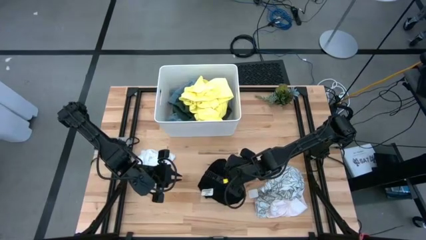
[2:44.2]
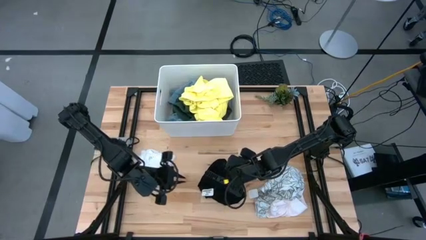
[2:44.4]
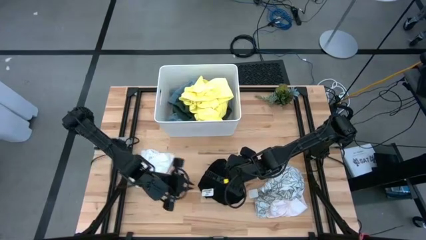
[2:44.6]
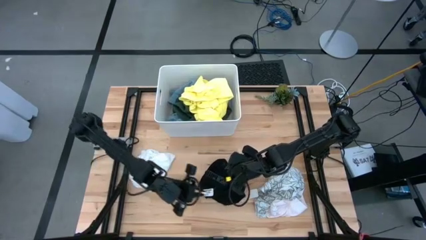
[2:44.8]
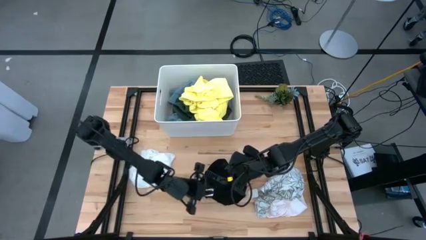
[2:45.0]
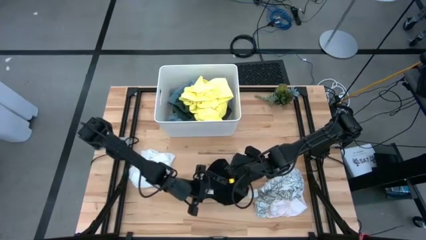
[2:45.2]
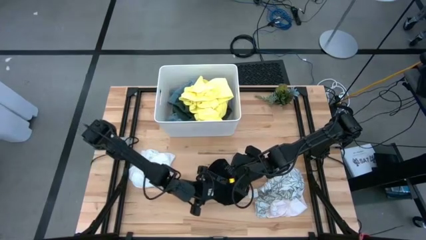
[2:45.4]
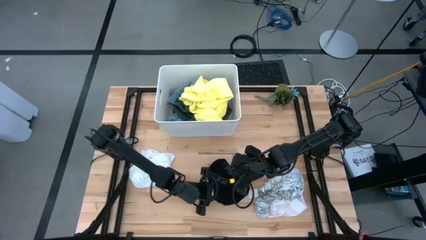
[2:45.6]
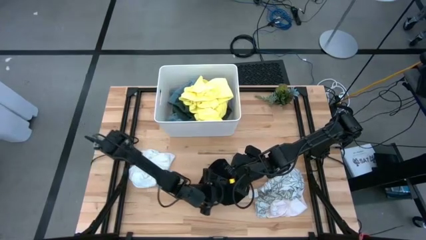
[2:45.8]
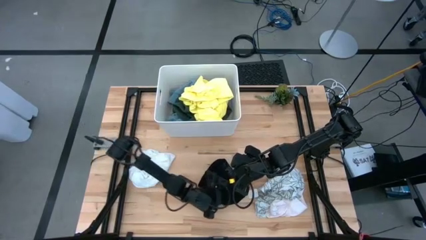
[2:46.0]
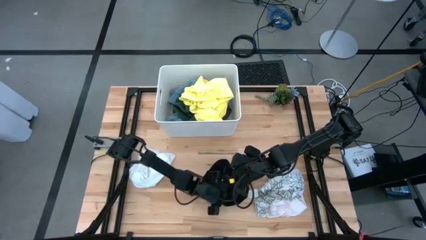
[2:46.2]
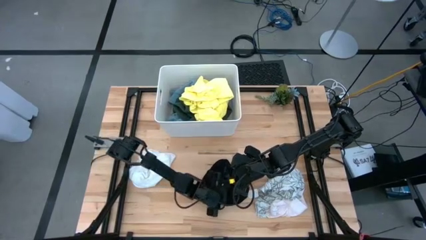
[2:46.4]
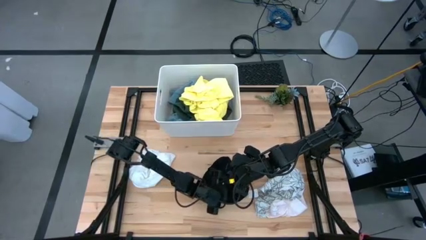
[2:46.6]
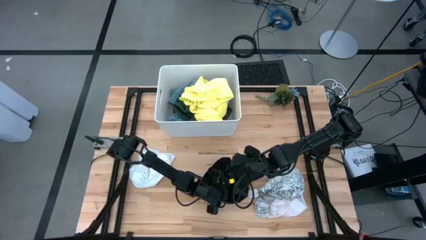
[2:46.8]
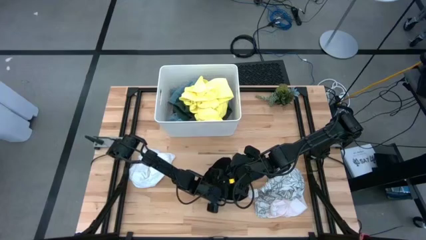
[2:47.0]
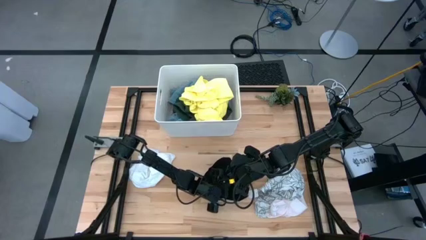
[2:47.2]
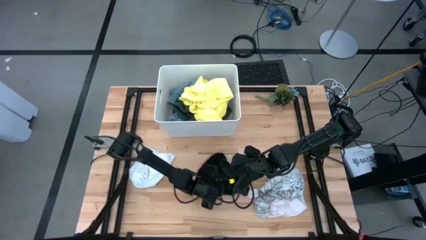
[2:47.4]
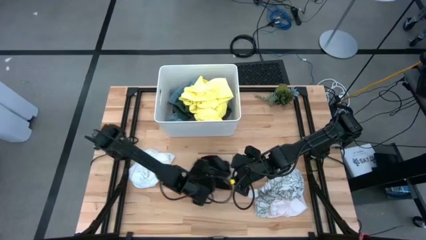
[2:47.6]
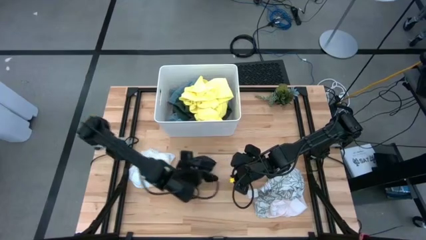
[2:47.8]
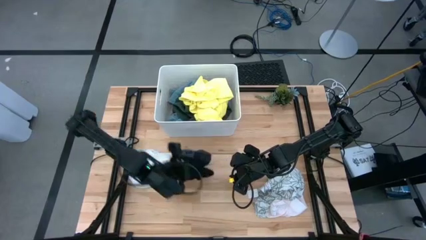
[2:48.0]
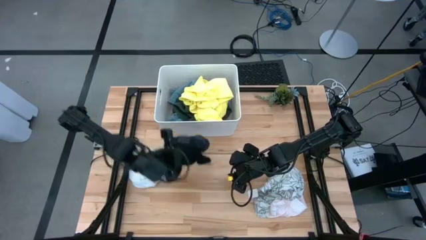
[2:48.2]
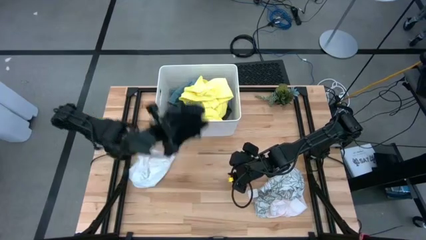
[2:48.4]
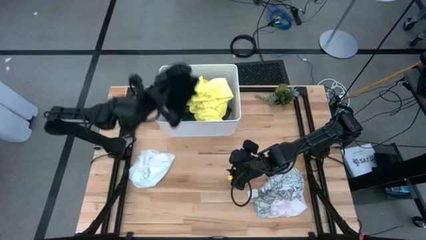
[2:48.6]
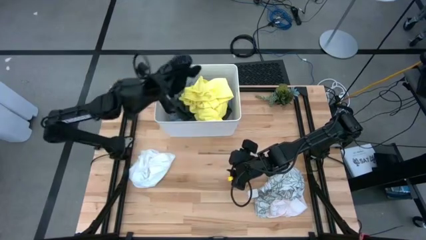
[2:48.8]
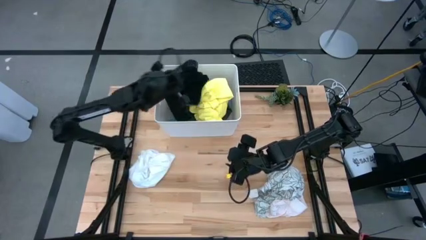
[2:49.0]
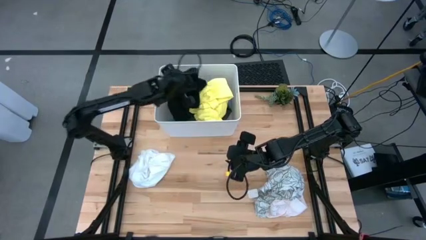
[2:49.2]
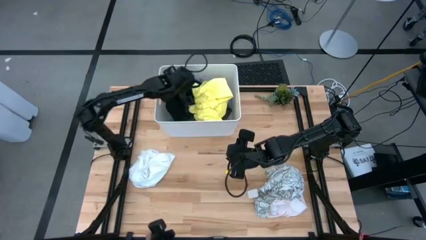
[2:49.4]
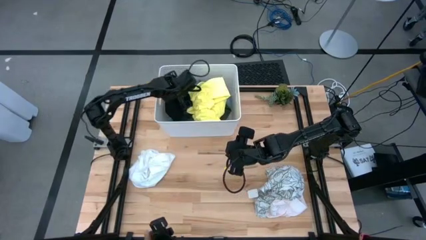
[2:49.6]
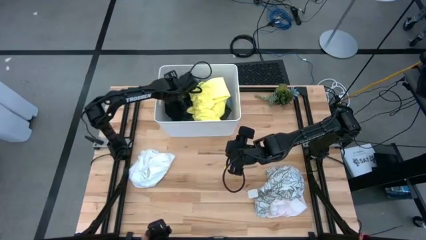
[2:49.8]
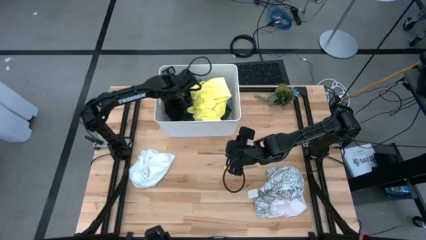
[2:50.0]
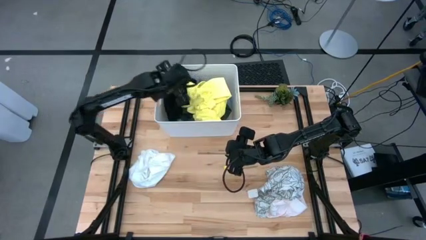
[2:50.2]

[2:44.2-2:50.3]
Task: Fold laundry
Put the folded black underwear into the white laundry bin

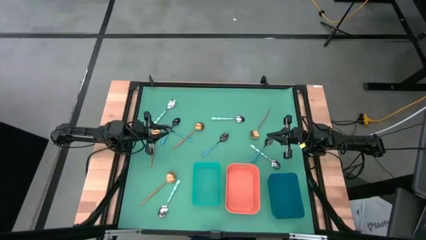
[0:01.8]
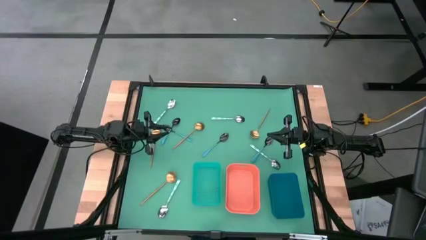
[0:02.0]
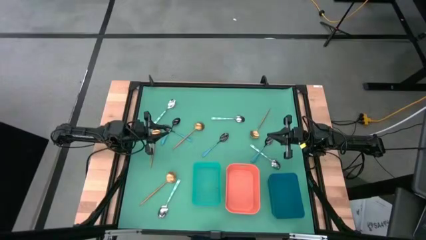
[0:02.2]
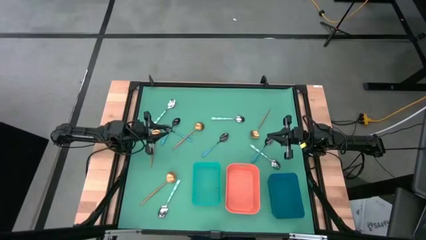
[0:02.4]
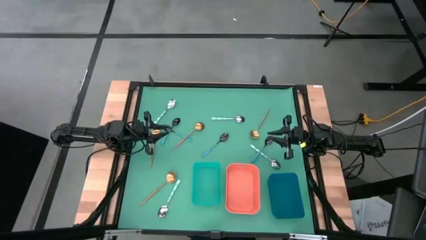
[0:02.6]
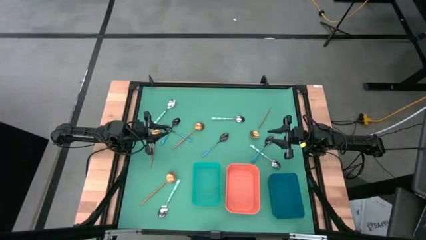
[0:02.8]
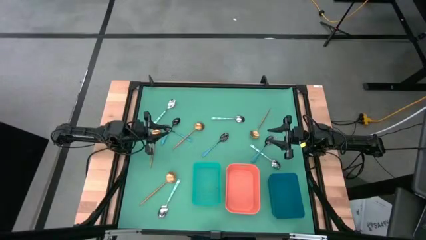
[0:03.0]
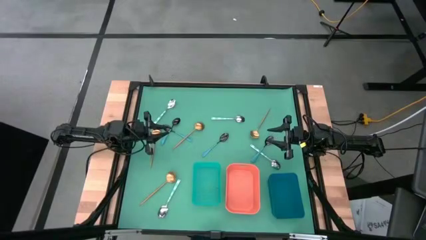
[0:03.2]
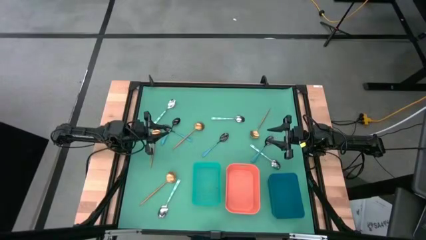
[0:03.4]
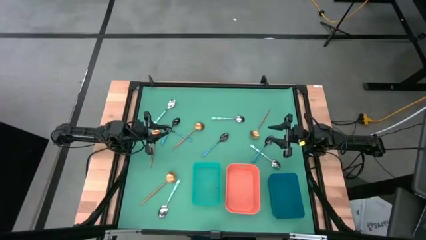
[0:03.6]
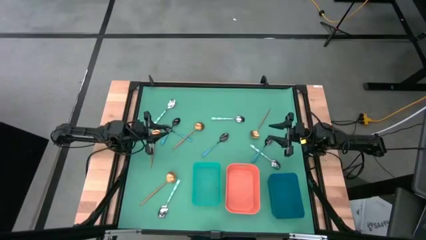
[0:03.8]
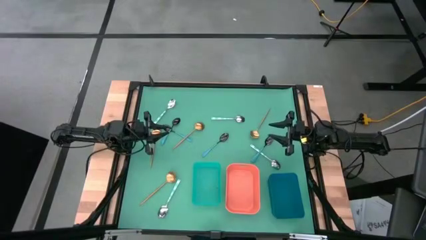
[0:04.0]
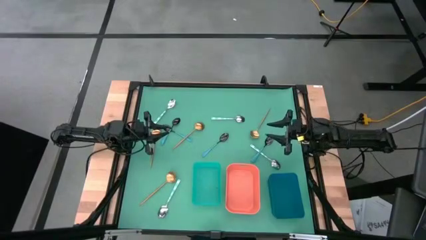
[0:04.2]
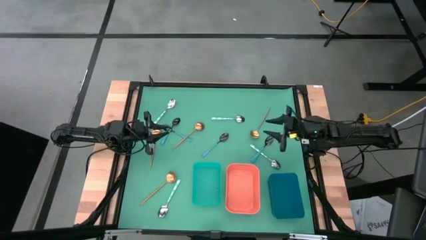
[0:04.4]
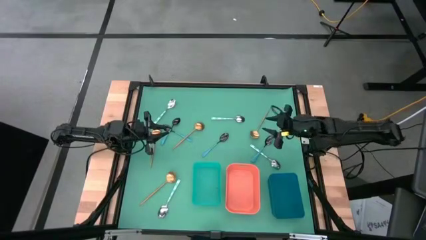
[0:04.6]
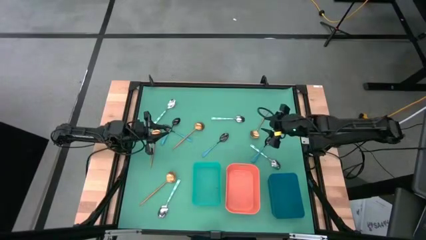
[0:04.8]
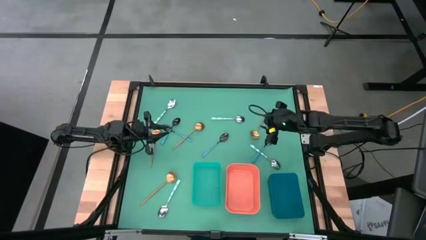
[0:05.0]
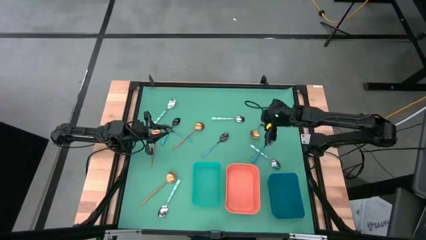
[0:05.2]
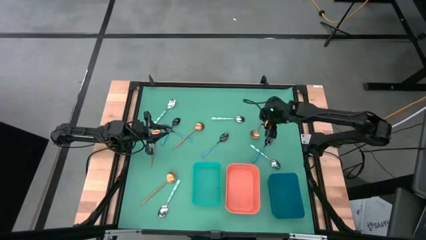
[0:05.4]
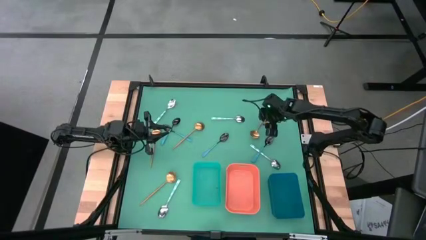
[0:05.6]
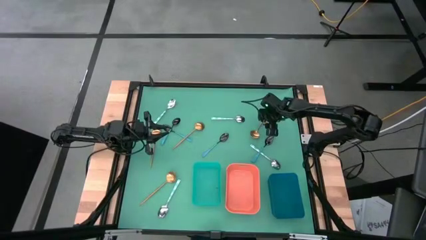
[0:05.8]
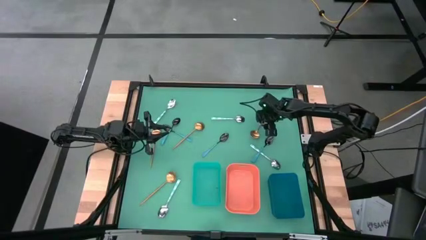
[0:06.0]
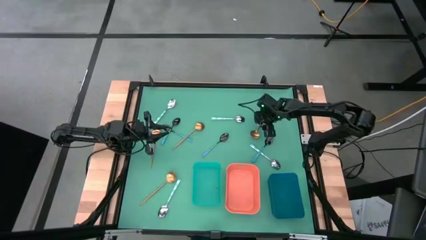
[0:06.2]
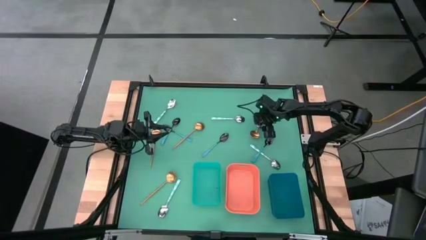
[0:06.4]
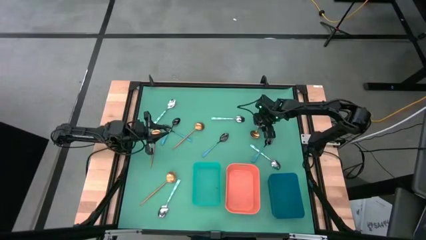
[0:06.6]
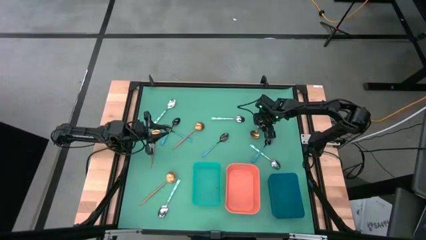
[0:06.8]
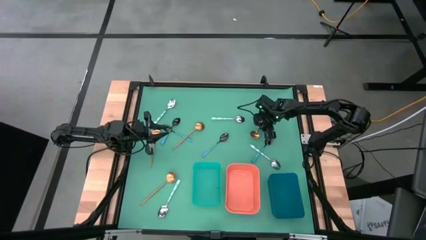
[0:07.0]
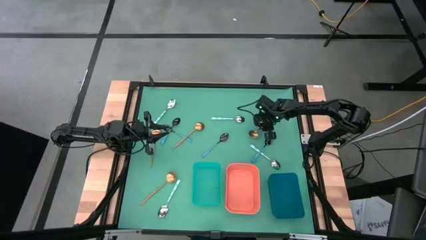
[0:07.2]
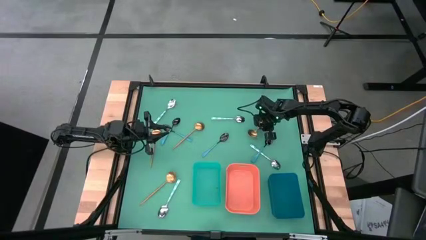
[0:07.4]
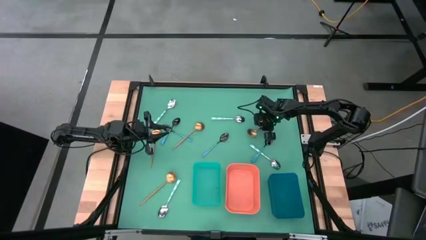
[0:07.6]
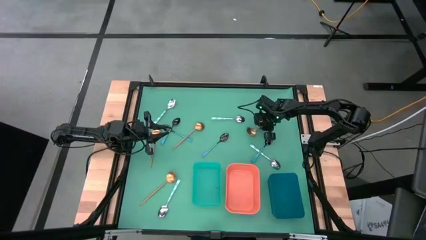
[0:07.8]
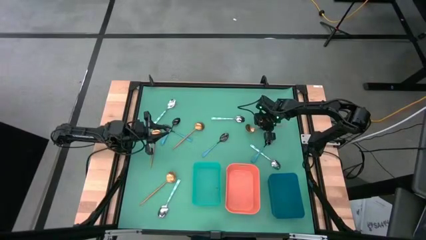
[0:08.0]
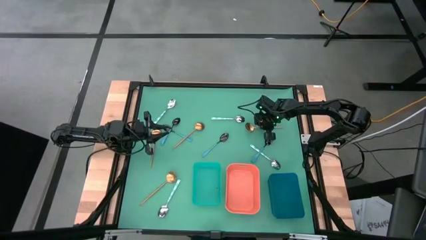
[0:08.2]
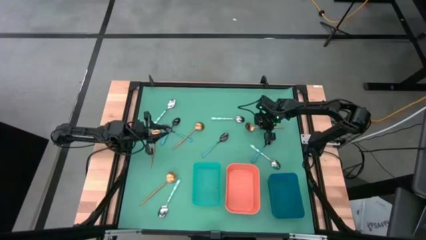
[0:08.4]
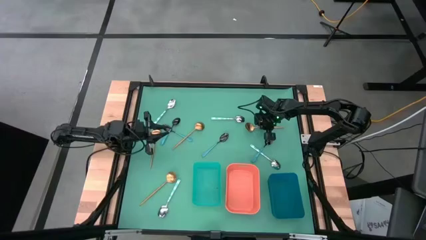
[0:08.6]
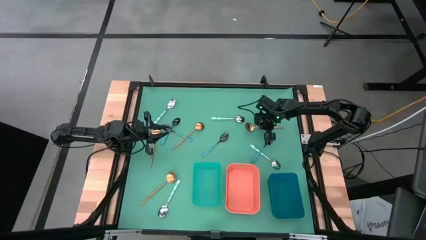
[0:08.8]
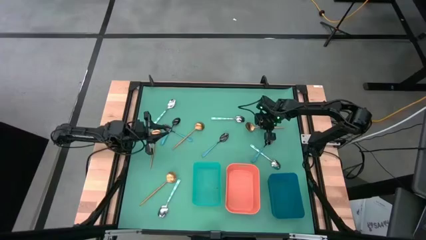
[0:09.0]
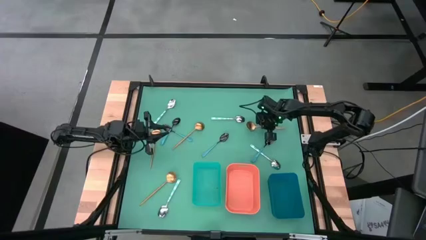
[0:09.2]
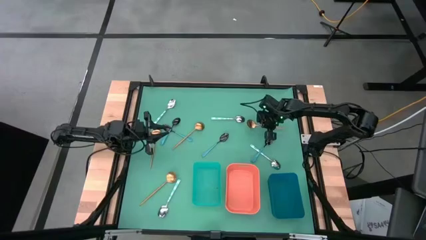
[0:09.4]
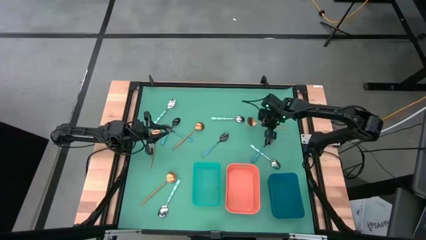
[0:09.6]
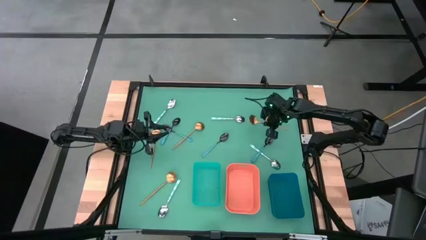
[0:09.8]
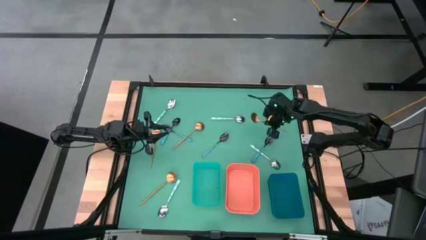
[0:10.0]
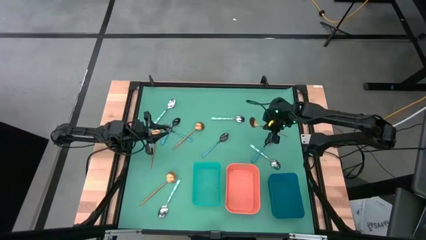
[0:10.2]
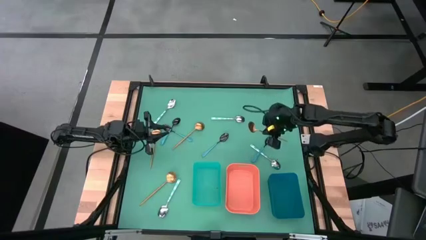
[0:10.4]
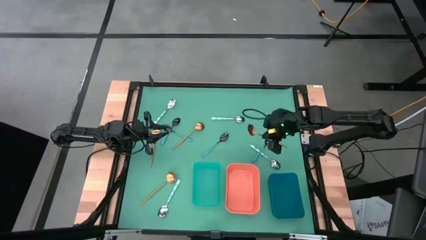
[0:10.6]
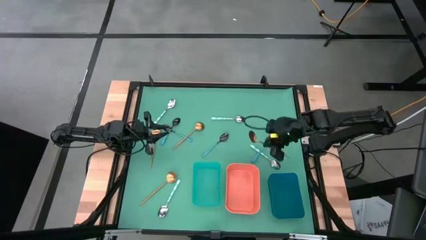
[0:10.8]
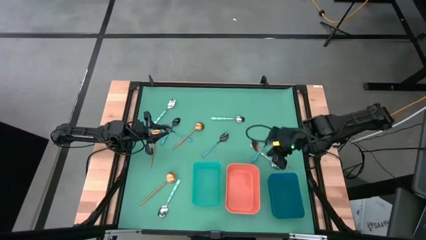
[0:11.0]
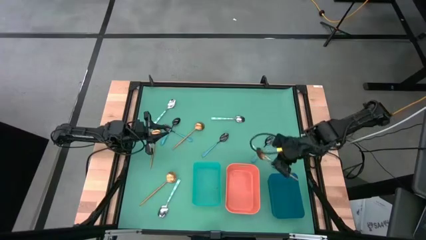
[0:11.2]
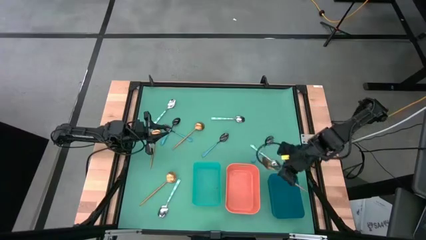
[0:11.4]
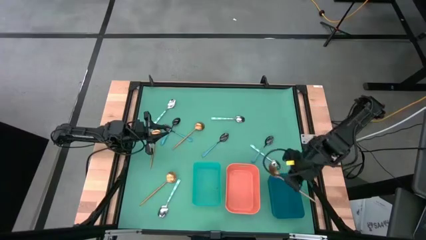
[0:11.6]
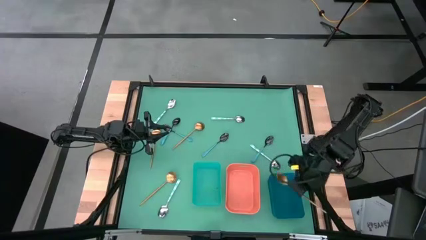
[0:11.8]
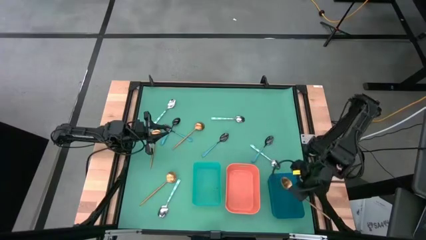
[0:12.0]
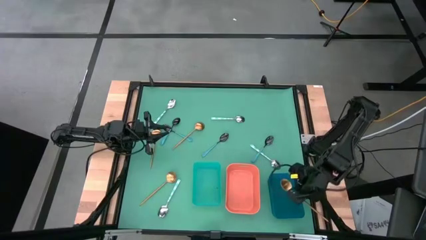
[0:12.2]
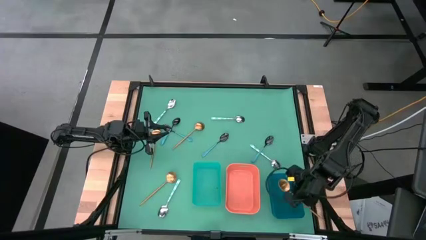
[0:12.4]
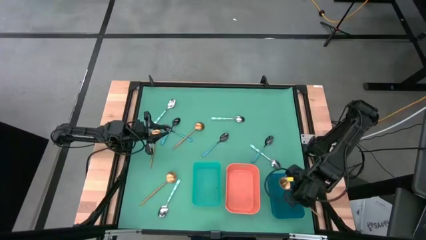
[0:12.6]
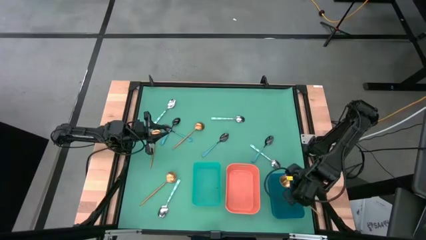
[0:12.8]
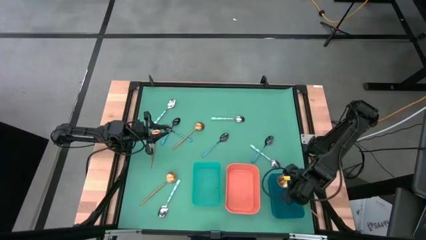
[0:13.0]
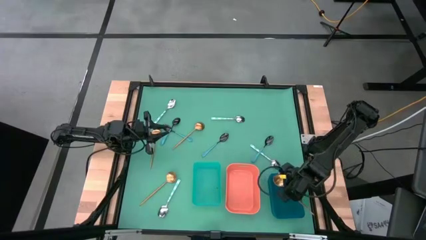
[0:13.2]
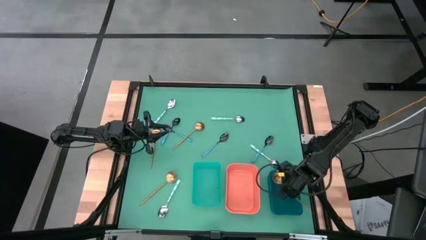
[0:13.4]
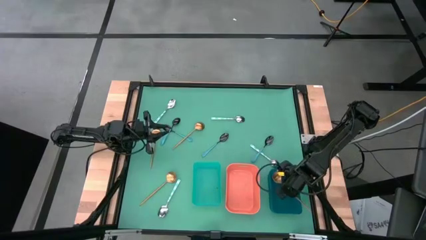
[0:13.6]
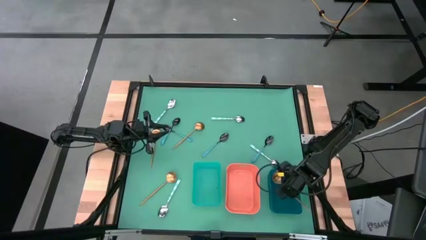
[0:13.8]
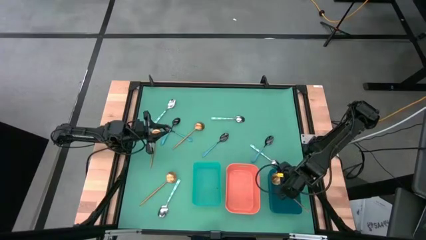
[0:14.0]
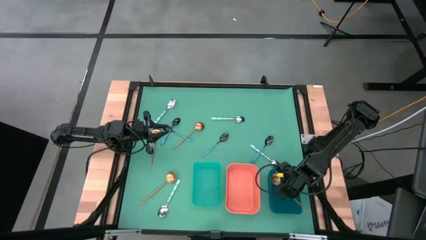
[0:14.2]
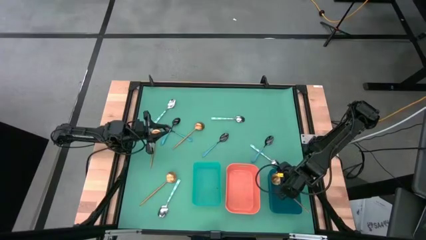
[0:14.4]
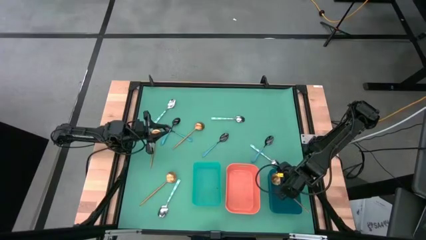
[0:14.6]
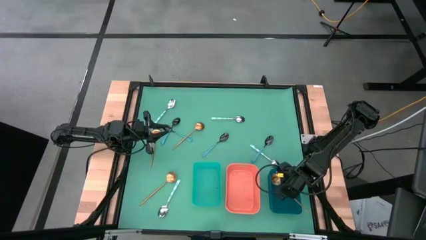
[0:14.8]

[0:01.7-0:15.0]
Task: Sort silverware by color (type)
Put the golden spoon into the blue bin
